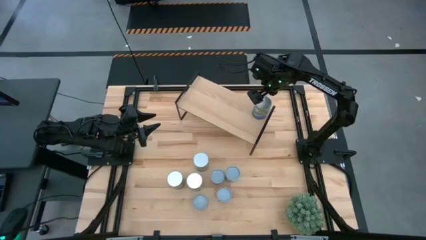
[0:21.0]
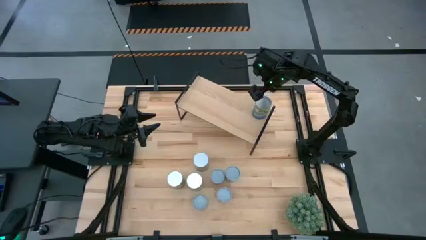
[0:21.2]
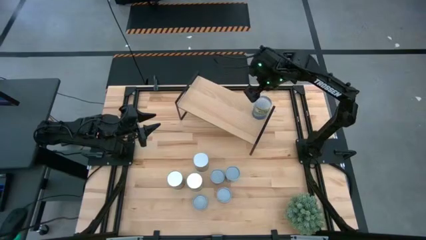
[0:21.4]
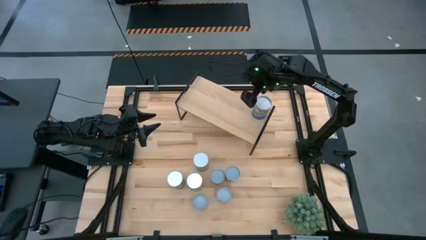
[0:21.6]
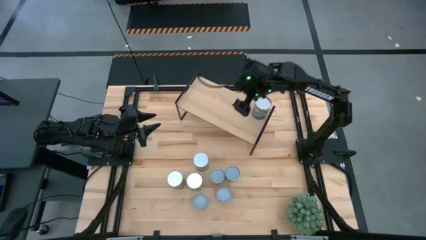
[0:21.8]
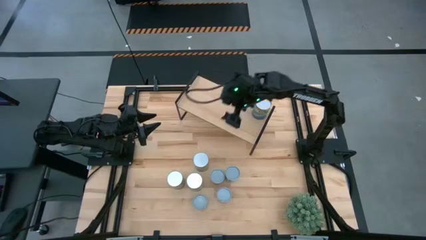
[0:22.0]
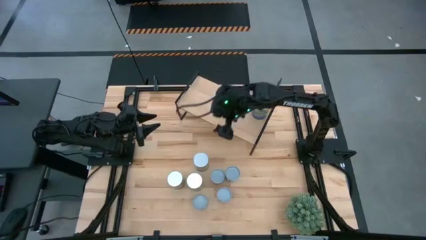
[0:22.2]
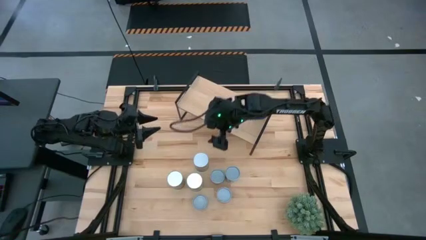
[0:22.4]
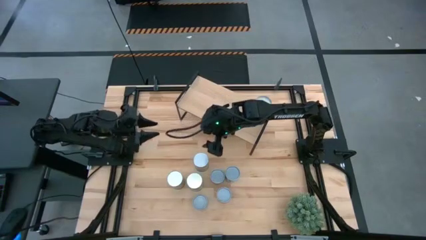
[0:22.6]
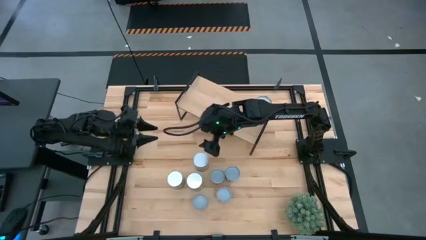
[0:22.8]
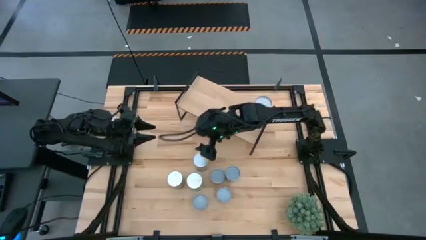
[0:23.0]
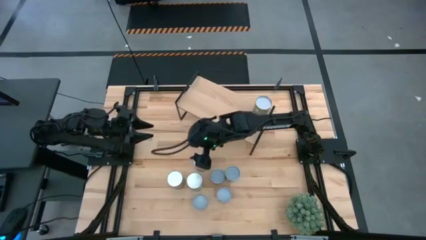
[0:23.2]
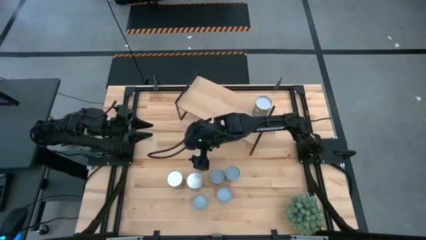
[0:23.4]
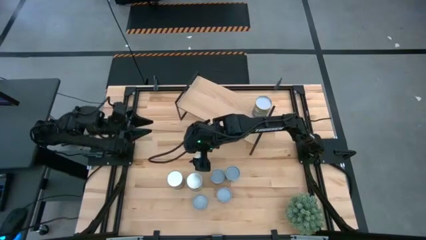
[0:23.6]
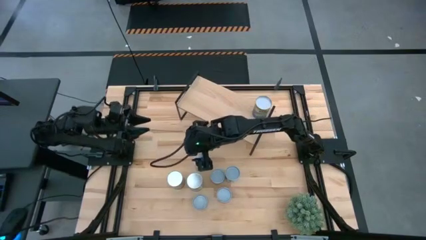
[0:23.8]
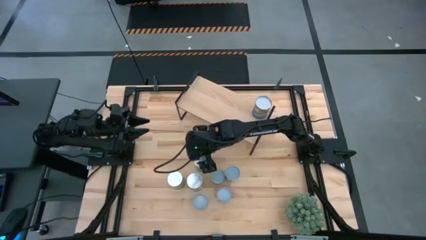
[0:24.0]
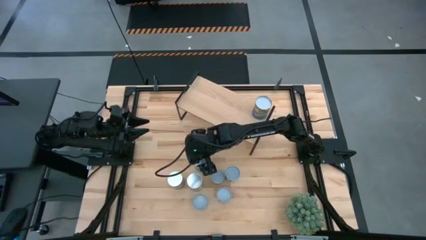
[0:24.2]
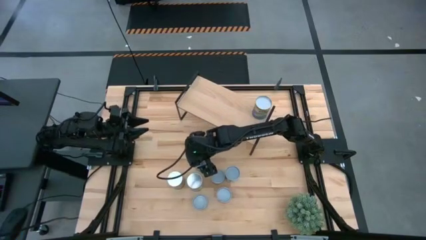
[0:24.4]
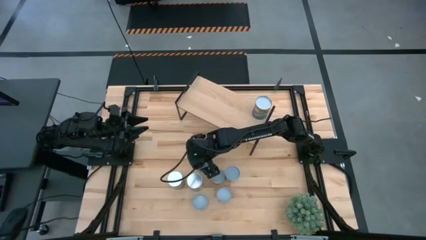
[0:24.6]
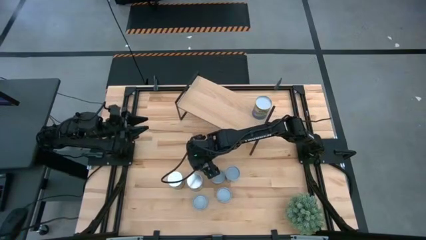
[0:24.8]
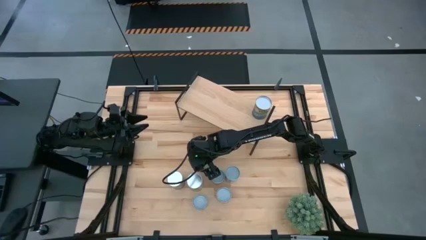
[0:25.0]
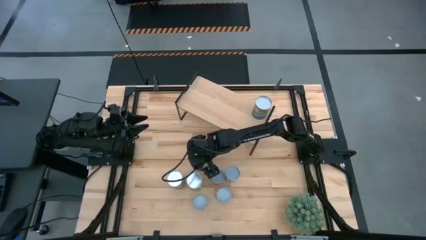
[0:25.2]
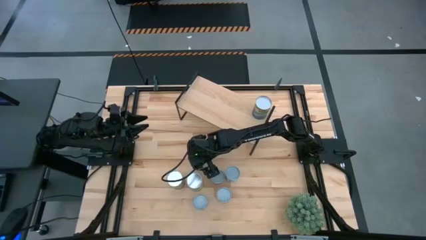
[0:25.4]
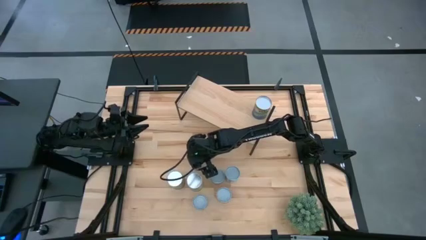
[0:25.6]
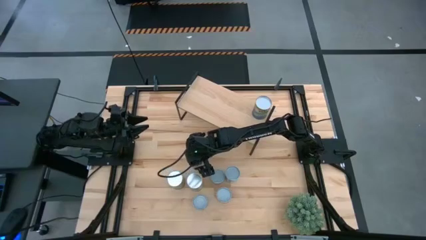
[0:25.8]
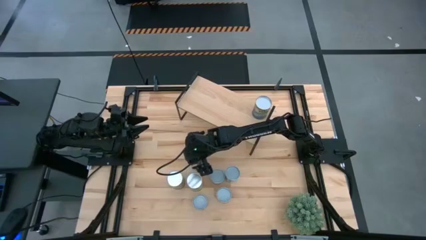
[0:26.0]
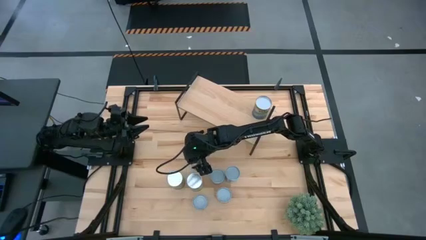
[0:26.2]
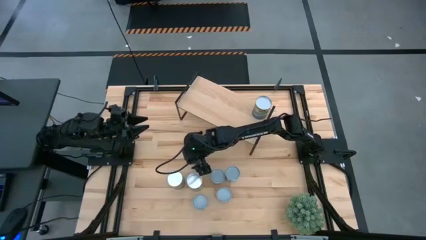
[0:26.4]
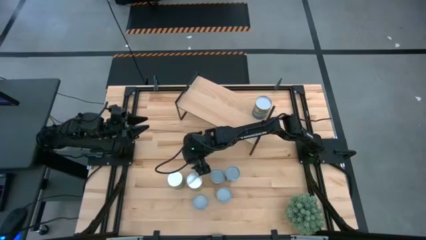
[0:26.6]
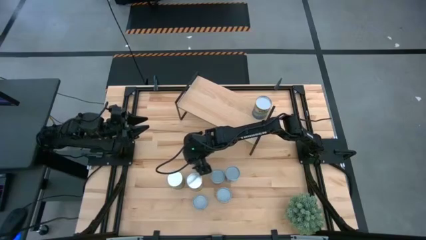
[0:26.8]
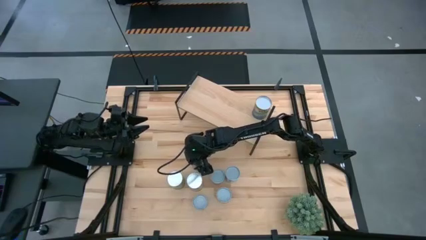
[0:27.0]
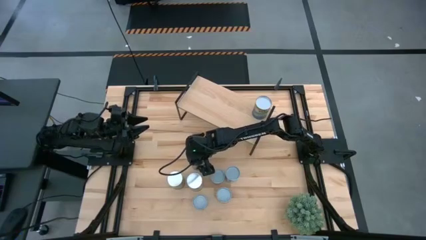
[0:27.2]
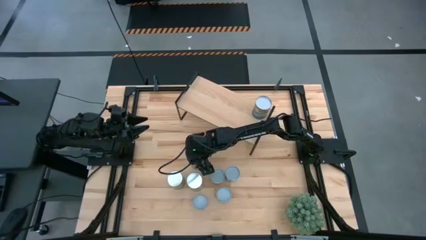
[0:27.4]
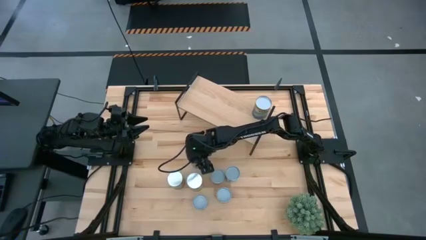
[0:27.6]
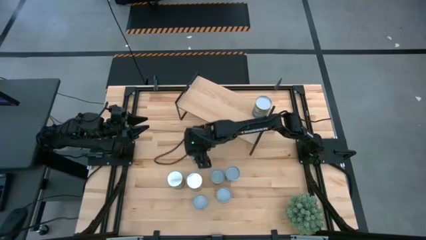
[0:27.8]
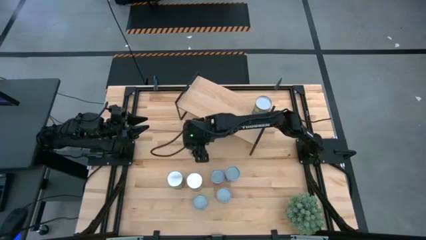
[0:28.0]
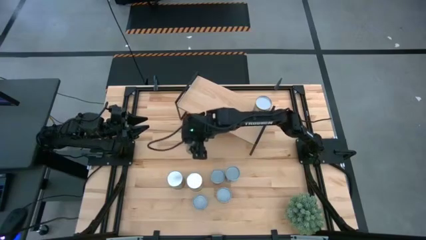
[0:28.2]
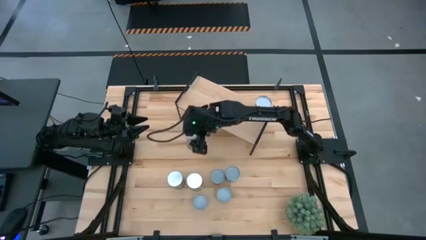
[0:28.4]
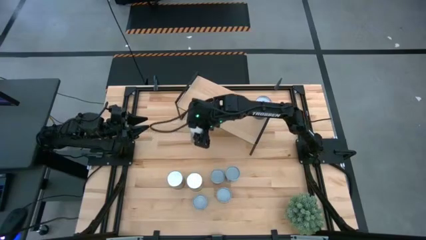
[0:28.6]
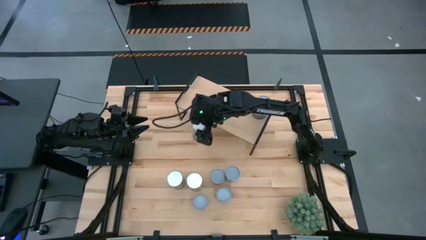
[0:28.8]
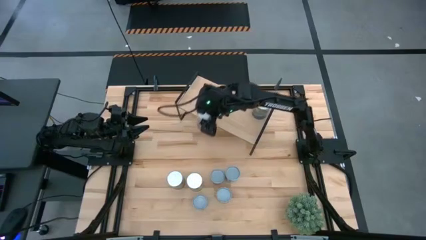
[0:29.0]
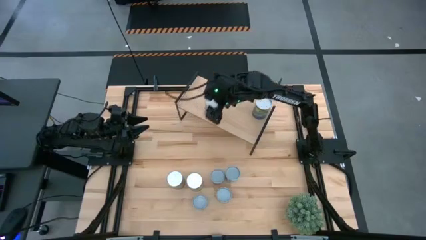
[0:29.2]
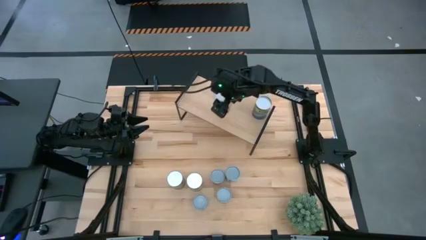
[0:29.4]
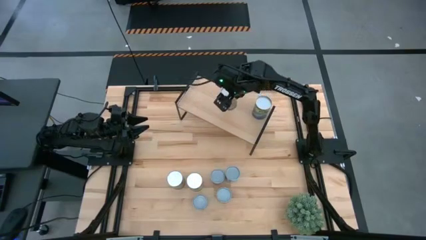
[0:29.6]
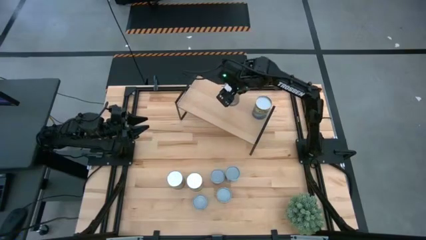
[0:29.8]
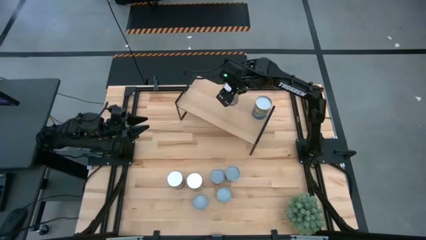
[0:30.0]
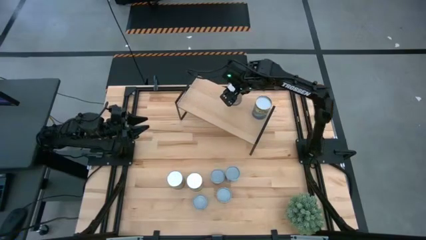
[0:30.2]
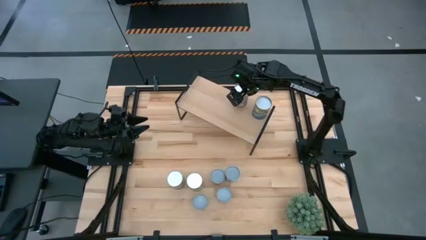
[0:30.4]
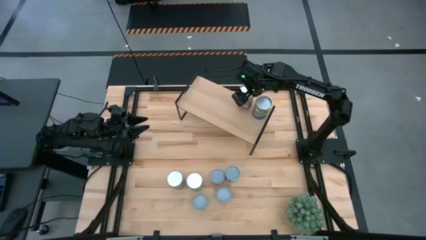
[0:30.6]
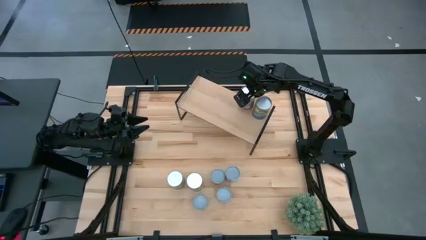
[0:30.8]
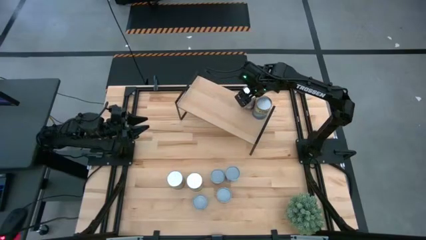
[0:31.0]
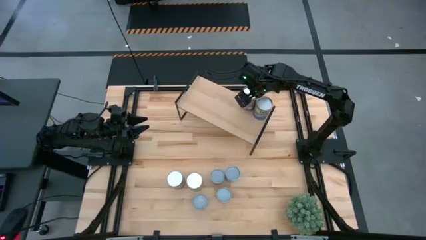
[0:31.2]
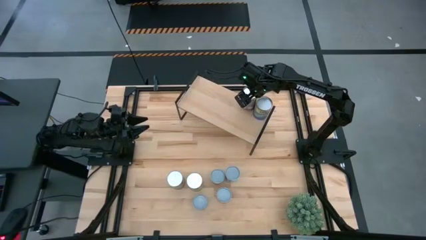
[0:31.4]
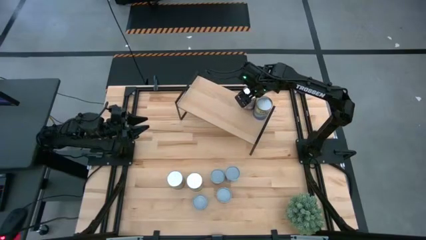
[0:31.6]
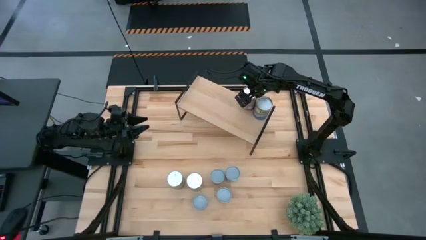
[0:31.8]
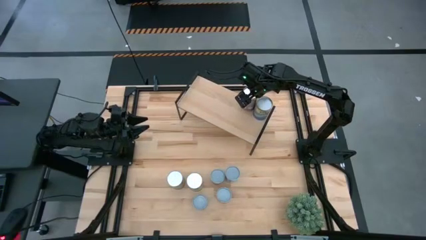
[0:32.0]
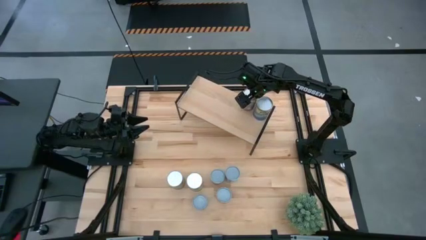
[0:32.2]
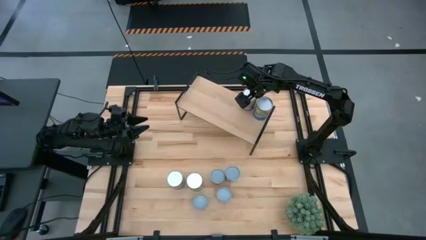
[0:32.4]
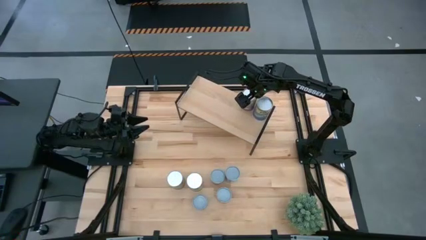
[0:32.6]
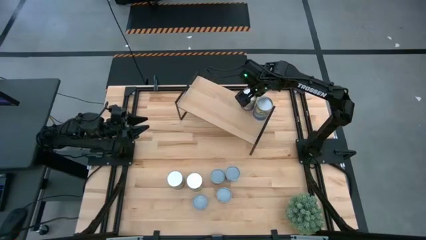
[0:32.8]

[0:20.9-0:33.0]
Task: Pick and place cans onto a shelf
Put the canned peaches on the shelf
